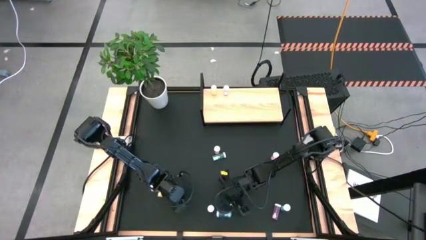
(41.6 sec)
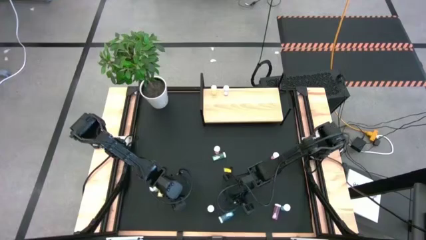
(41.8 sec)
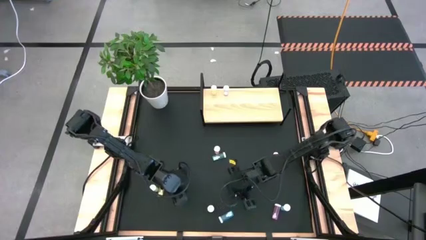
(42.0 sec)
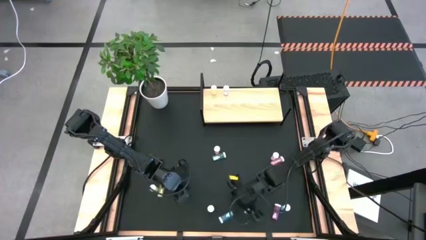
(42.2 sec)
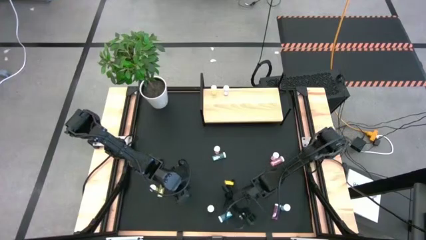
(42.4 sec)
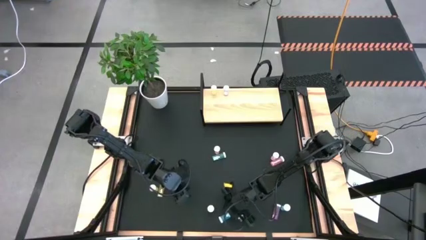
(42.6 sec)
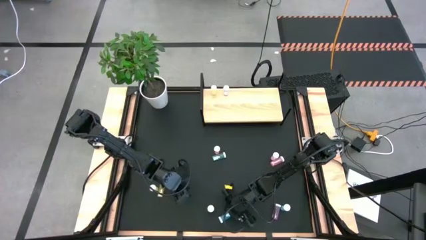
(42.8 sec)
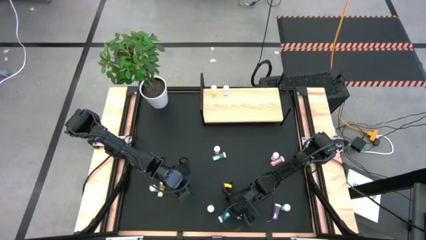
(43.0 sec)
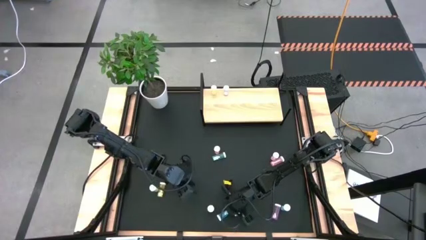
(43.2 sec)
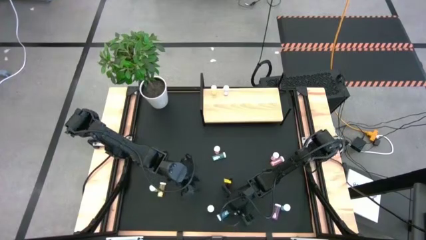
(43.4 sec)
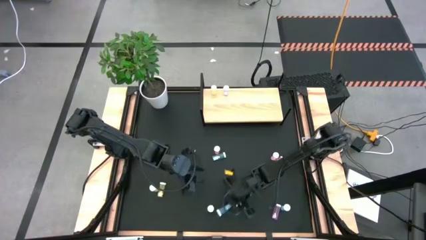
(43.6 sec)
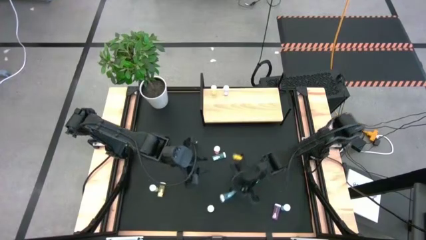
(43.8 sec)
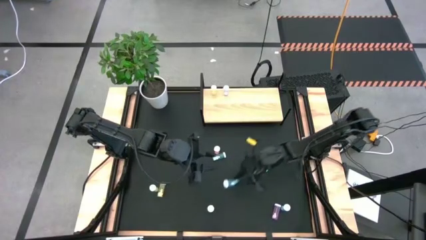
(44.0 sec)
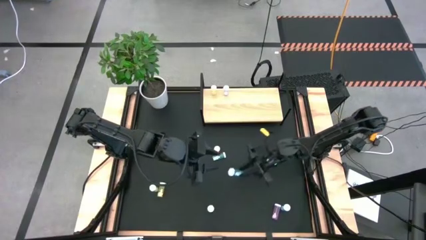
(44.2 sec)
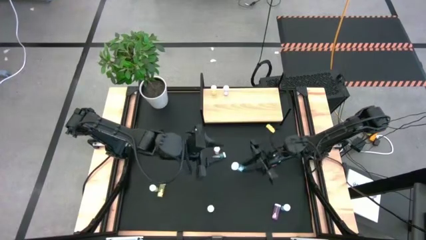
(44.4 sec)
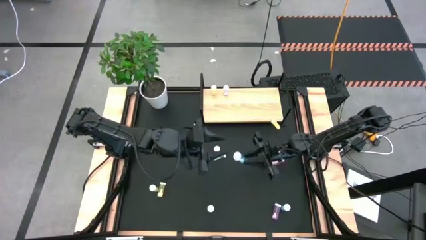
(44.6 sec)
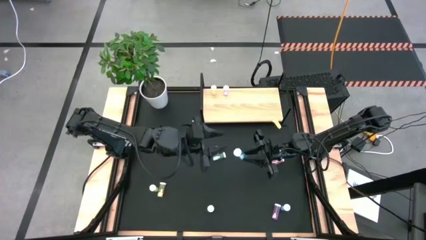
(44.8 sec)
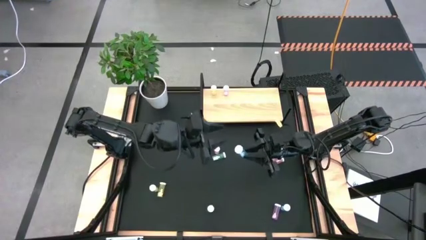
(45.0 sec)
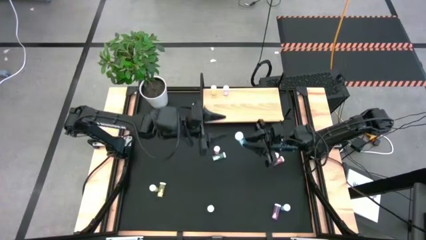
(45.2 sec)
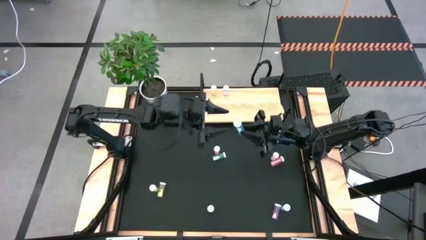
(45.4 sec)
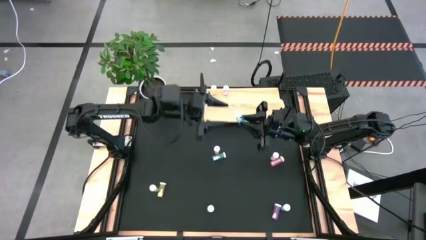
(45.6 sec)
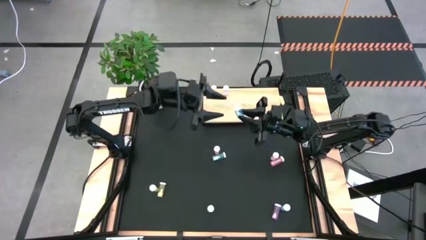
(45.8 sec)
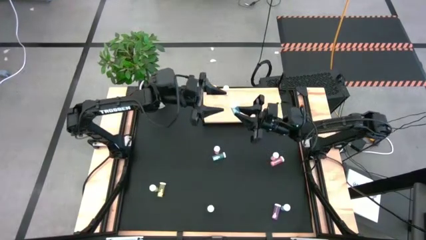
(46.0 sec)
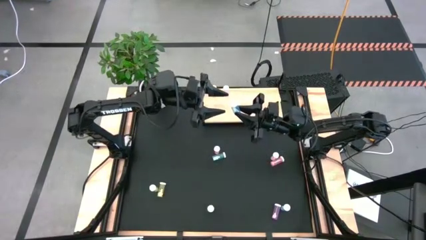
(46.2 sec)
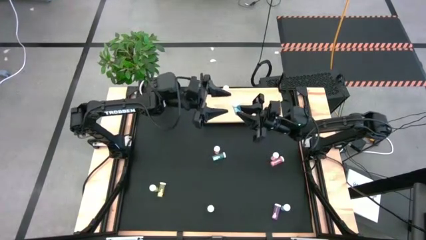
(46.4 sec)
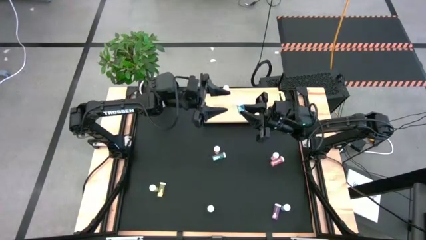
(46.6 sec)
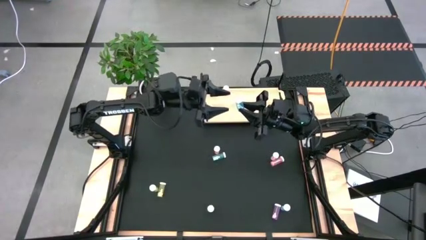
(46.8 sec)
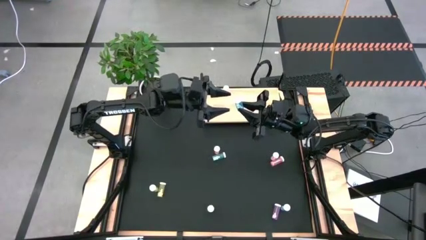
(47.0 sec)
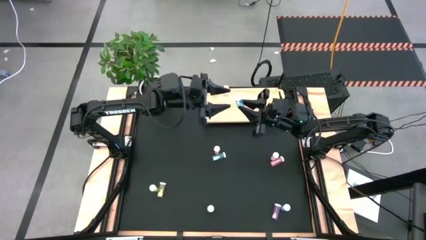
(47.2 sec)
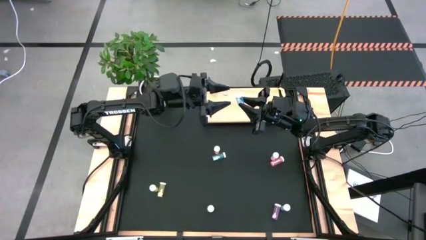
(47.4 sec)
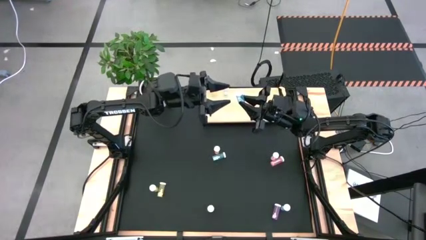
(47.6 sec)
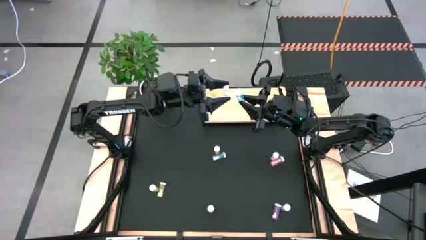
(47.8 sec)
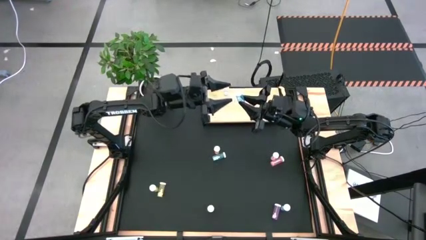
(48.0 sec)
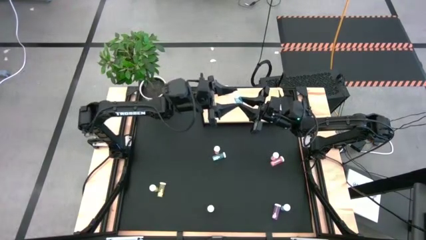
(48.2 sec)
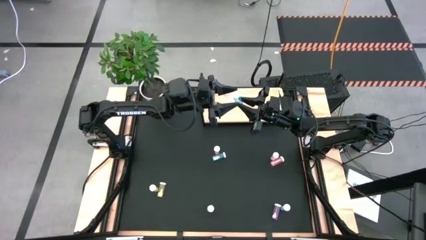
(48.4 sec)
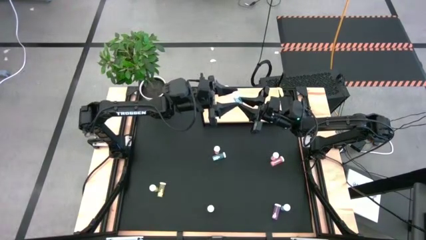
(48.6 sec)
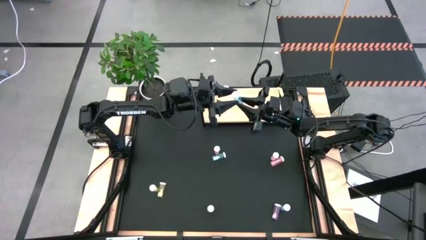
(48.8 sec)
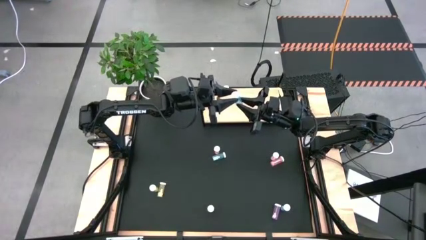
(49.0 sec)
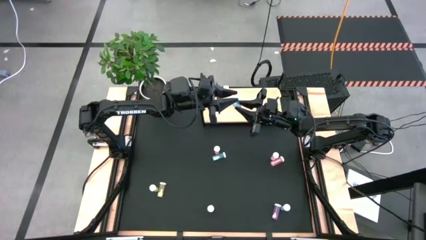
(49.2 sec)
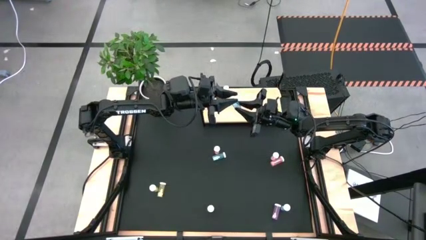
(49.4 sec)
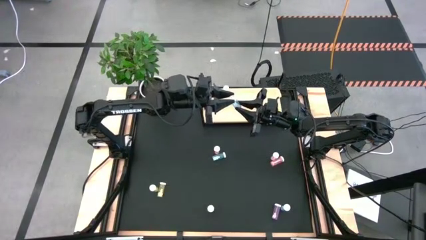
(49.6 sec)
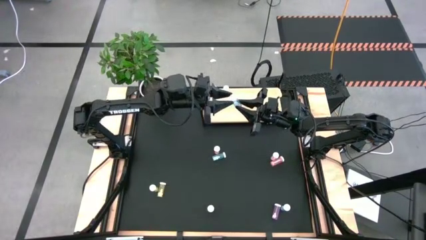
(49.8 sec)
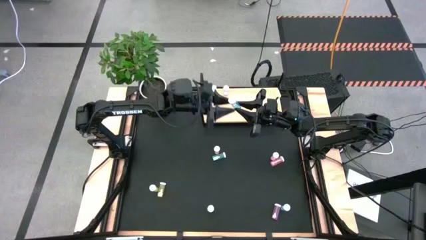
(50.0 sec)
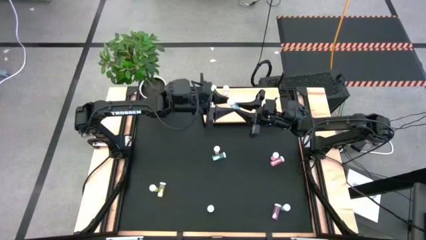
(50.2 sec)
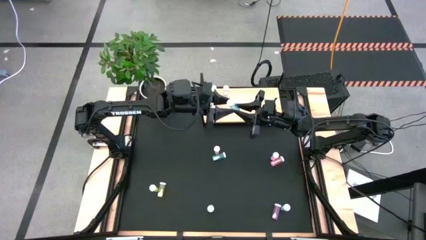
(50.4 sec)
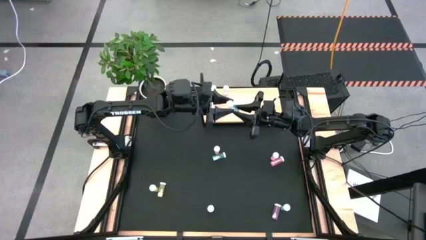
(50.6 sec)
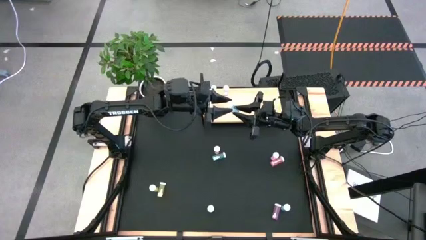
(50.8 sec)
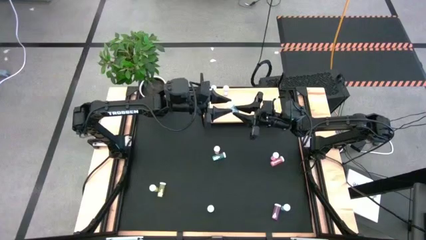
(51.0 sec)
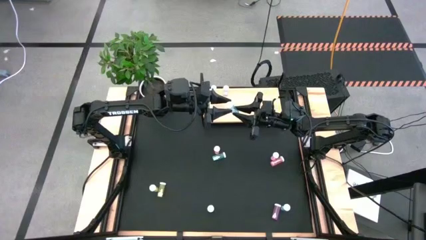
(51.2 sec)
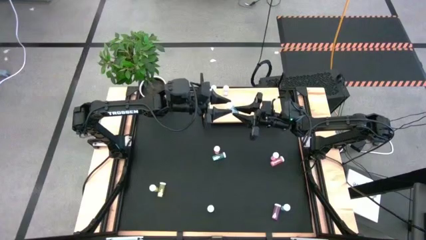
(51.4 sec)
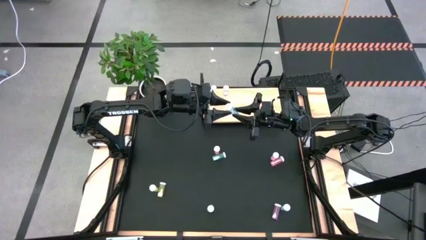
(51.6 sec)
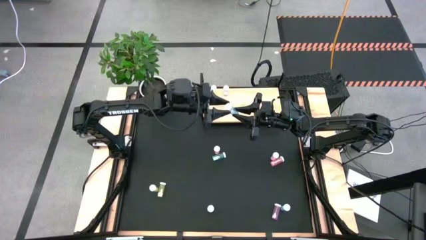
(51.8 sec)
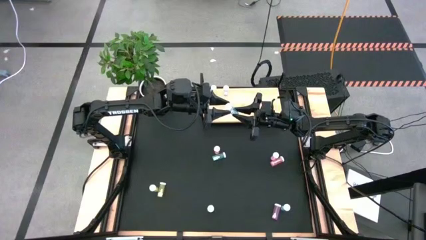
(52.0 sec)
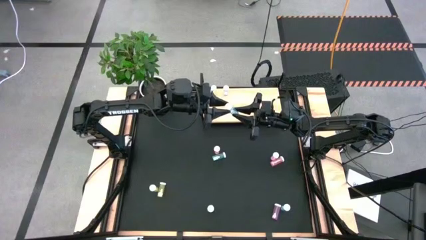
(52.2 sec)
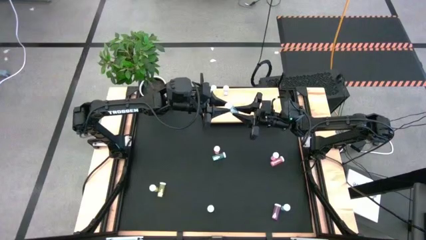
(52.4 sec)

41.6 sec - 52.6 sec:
Task: Pick and place medicine bottles onto shelf by color
Put the bottom left blue pill bottle on the shelf

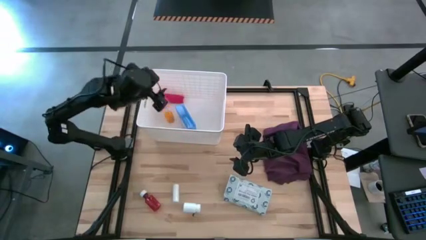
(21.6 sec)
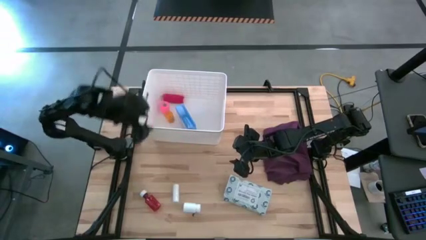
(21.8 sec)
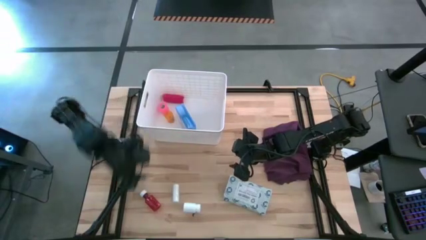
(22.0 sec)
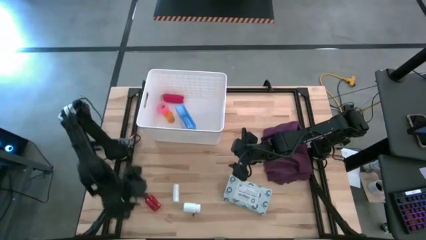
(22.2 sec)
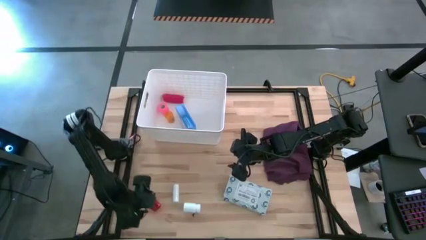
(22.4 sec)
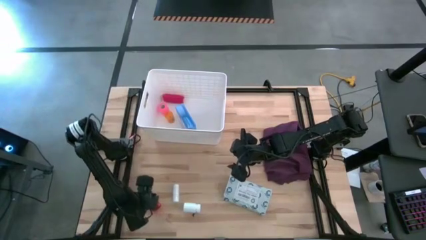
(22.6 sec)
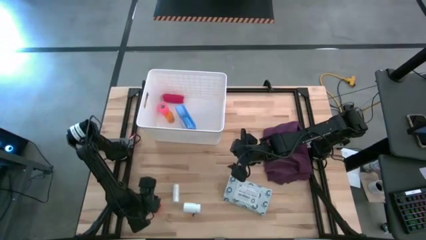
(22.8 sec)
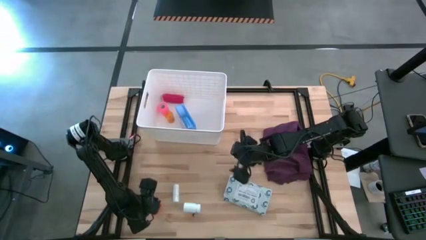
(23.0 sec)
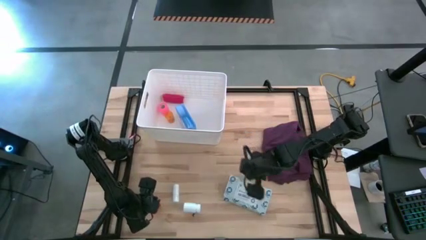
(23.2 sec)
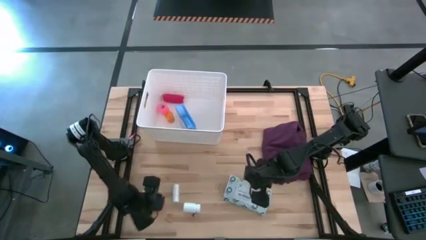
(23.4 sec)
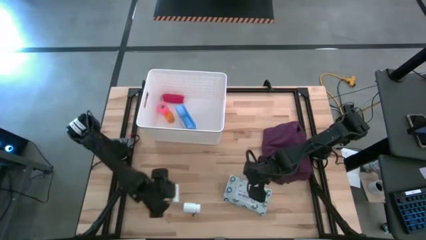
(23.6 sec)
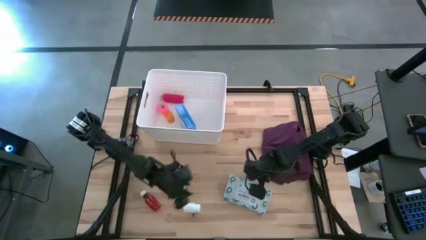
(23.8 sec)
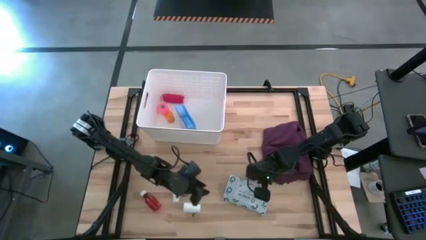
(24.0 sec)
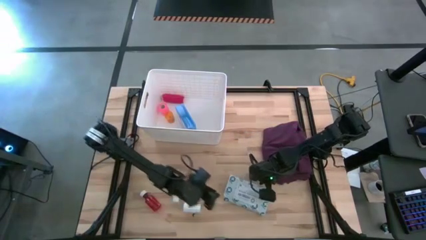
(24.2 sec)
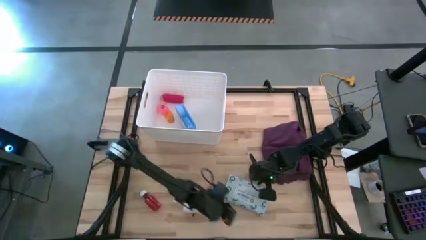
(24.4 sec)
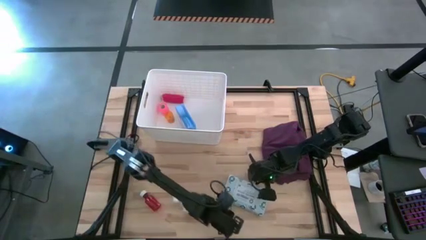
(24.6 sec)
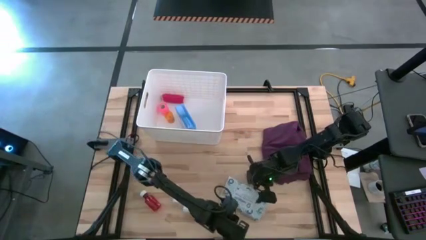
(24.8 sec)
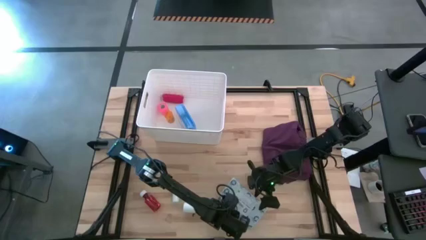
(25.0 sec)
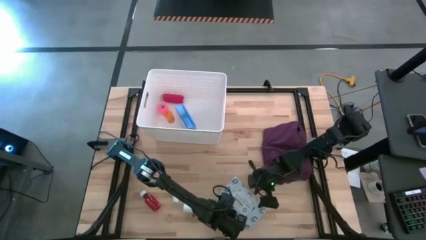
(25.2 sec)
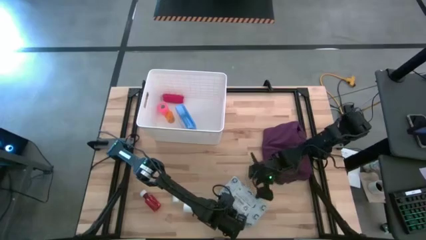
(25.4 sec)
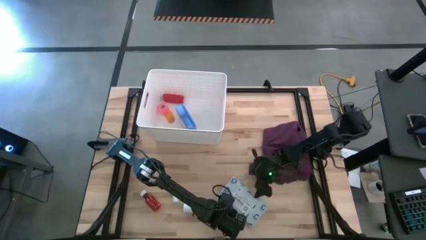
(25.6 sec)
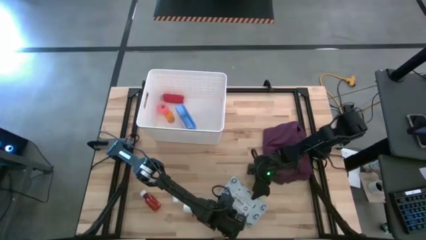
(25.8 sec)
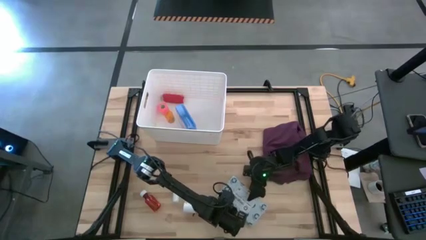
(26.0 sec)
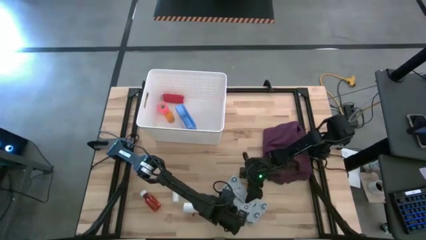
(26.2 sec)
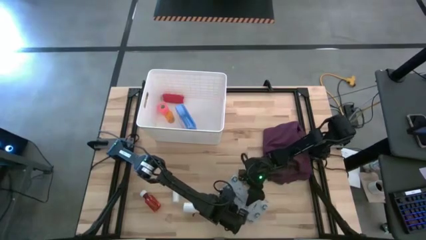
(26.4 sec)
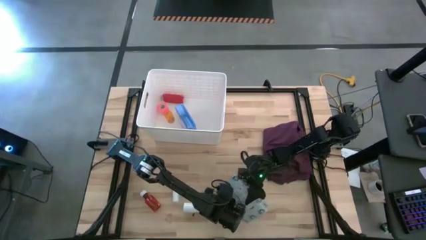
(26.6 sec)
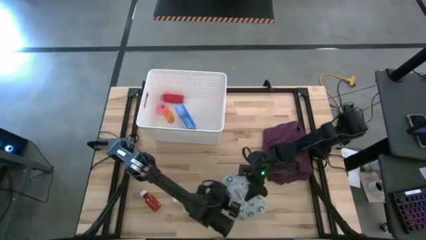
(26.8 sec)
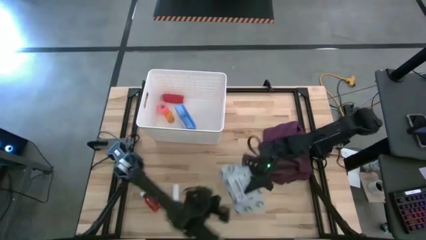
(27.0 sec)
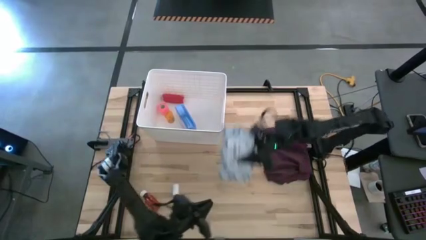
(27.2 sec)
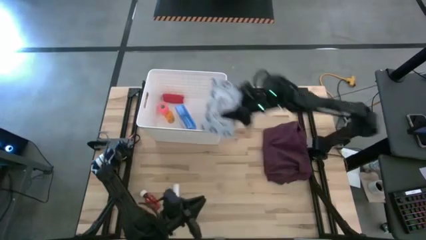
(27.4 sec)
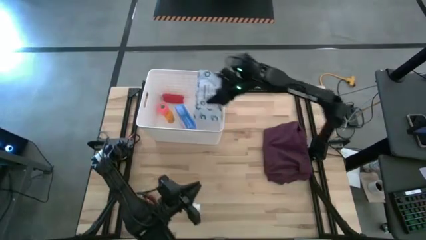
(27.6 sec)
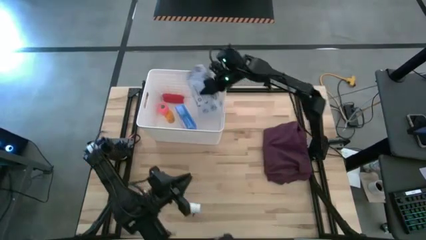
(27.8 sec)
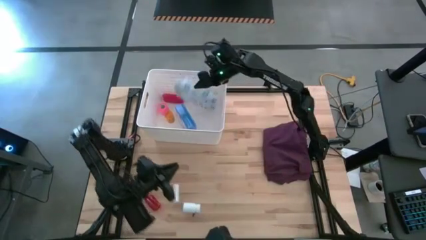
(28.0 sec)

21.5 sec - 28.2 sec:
Task: Pick & place medical supplies in basket/bin
Put the mailer bag into the white bin
